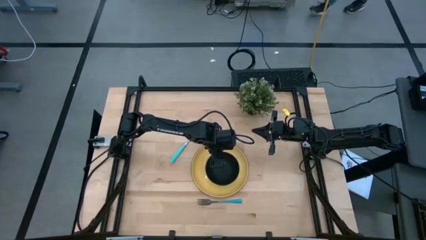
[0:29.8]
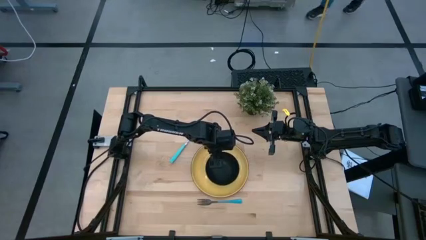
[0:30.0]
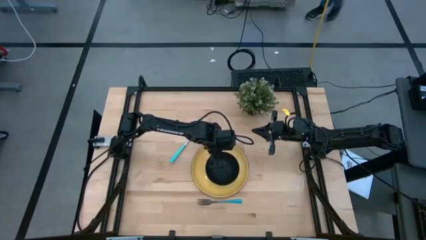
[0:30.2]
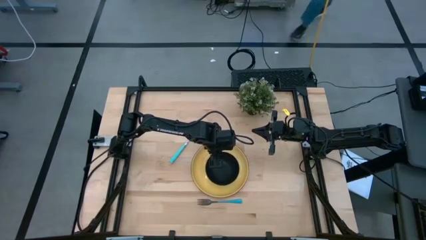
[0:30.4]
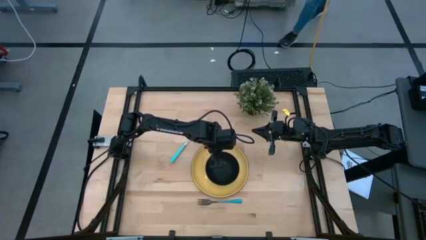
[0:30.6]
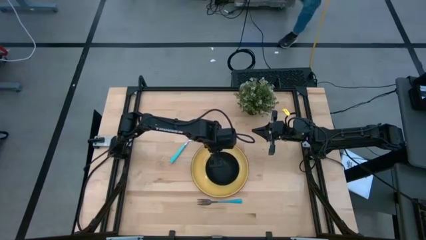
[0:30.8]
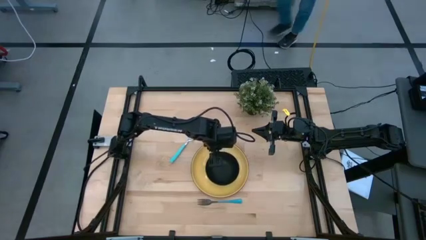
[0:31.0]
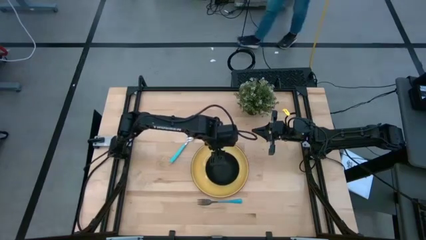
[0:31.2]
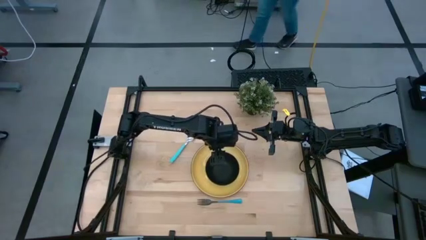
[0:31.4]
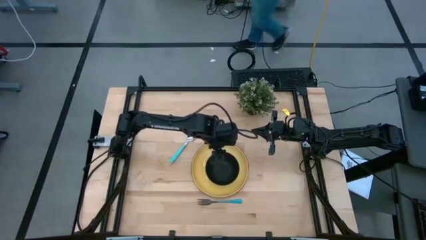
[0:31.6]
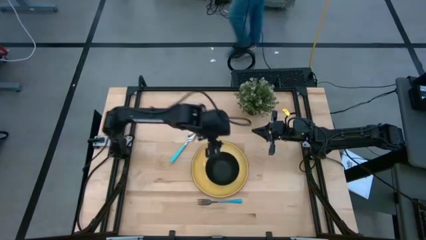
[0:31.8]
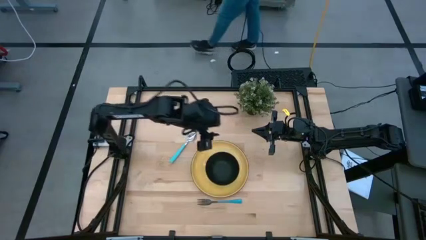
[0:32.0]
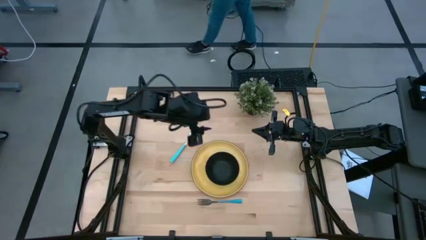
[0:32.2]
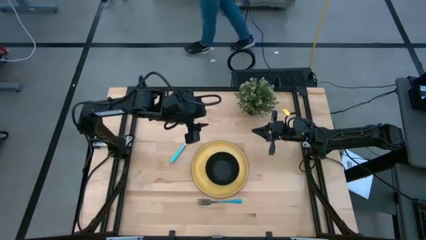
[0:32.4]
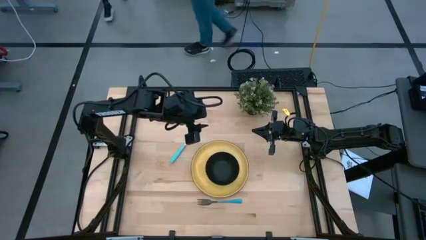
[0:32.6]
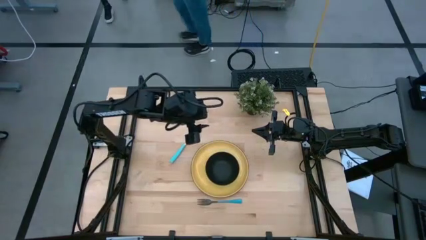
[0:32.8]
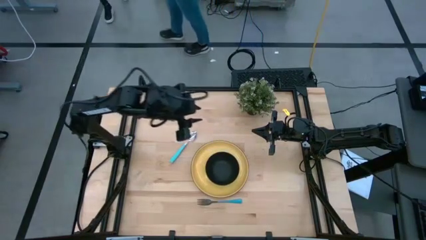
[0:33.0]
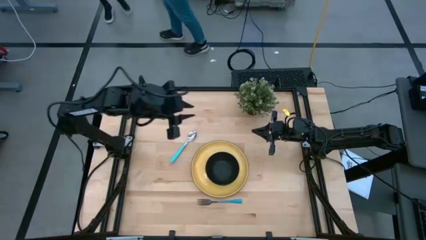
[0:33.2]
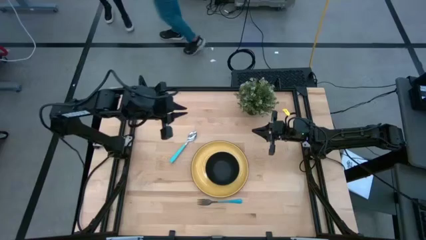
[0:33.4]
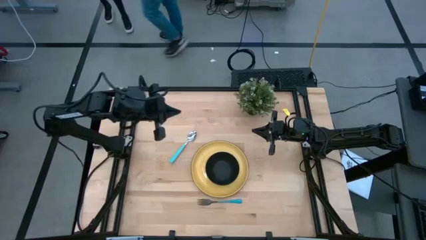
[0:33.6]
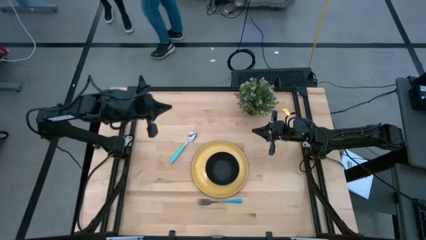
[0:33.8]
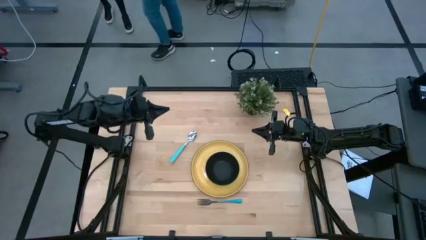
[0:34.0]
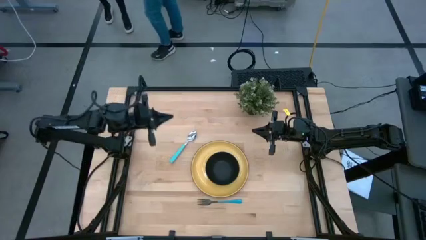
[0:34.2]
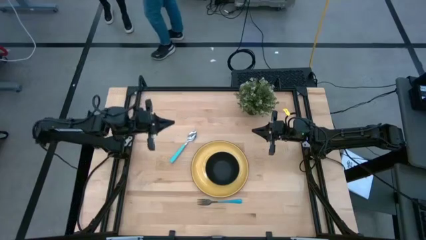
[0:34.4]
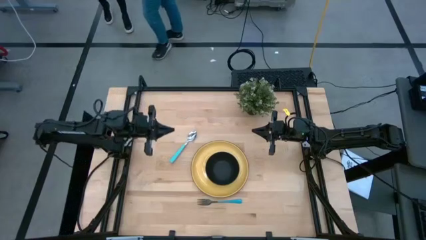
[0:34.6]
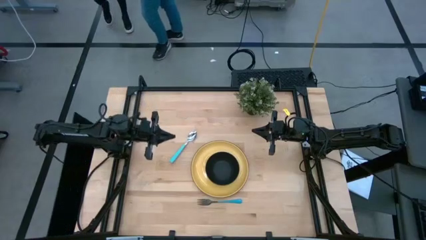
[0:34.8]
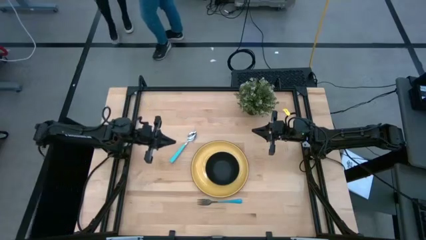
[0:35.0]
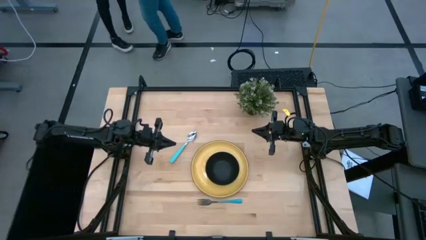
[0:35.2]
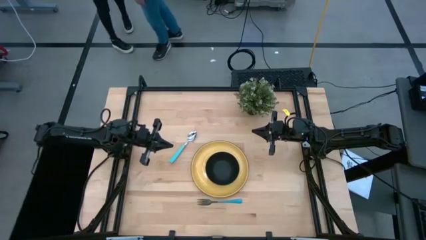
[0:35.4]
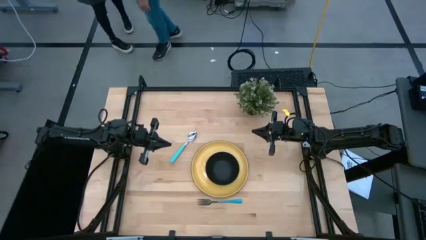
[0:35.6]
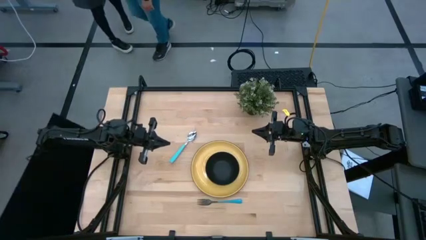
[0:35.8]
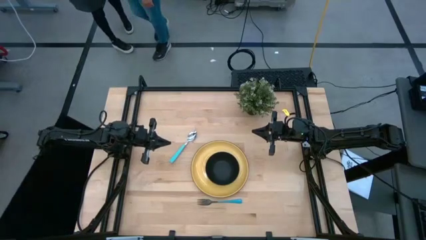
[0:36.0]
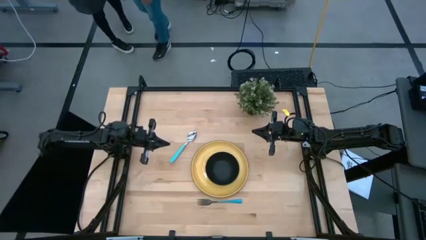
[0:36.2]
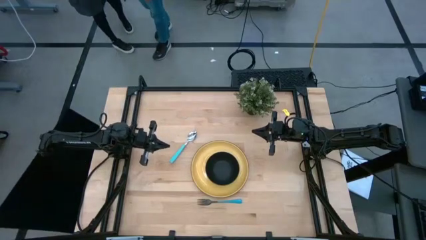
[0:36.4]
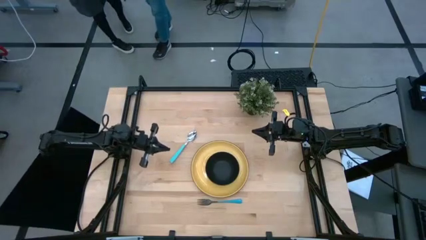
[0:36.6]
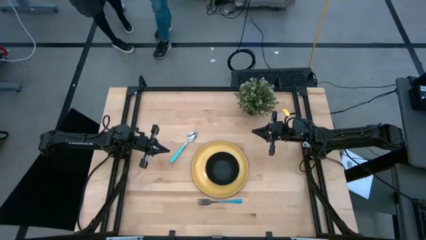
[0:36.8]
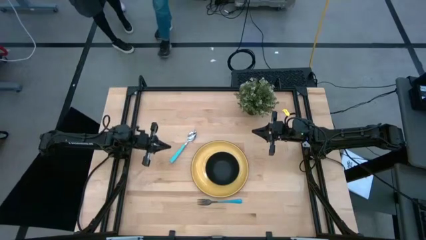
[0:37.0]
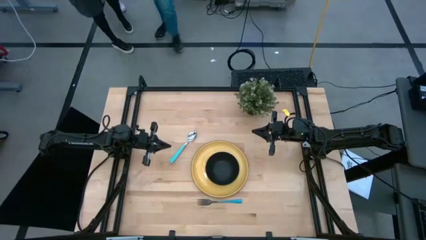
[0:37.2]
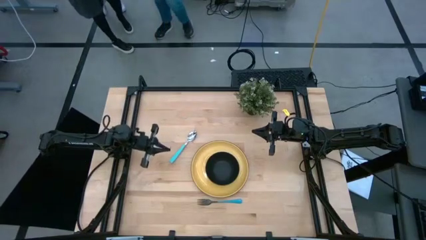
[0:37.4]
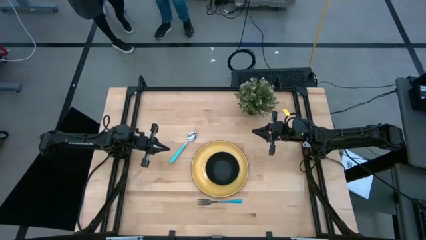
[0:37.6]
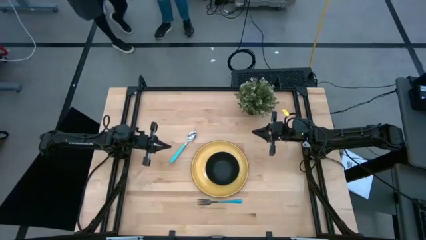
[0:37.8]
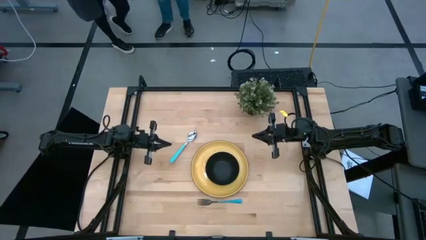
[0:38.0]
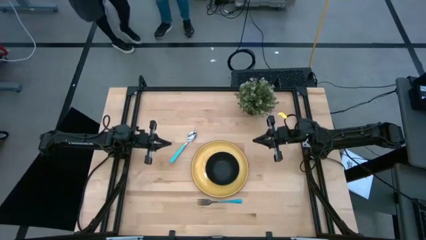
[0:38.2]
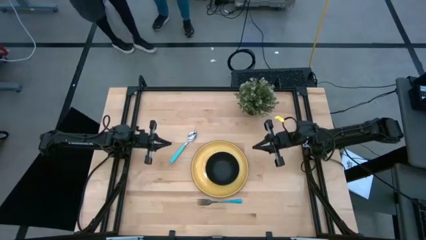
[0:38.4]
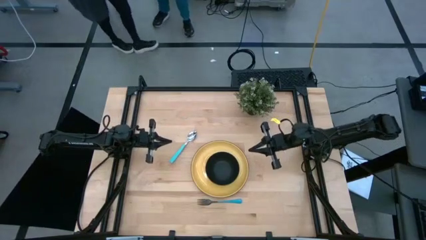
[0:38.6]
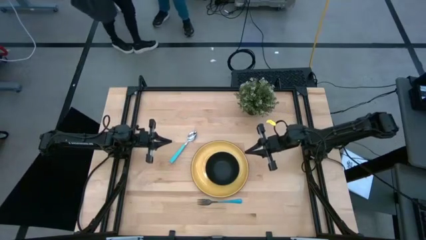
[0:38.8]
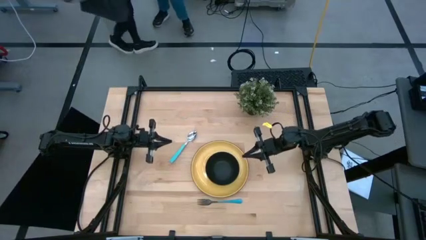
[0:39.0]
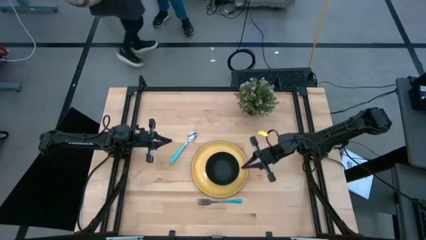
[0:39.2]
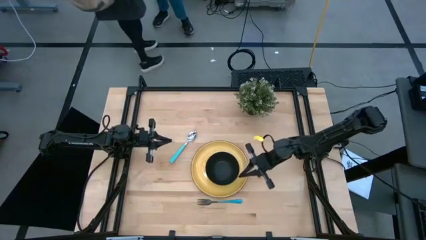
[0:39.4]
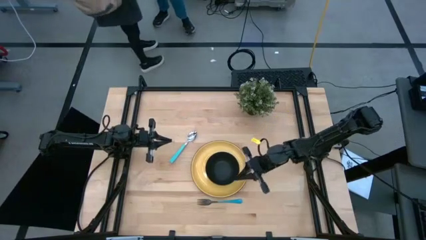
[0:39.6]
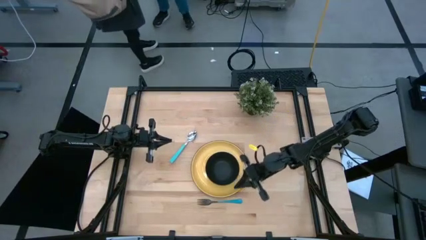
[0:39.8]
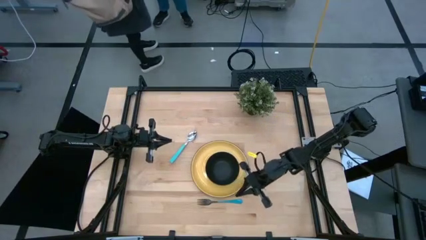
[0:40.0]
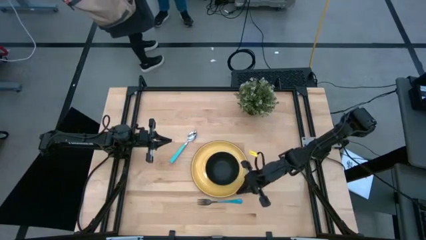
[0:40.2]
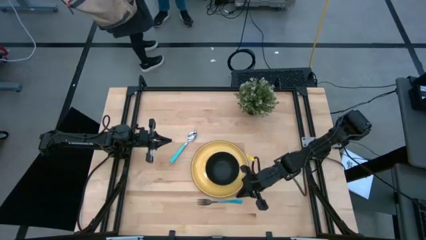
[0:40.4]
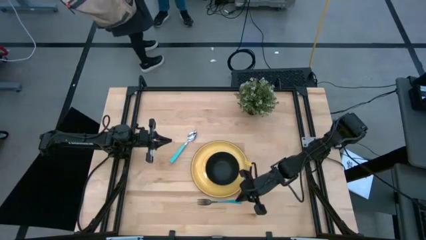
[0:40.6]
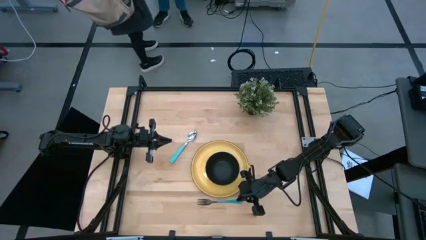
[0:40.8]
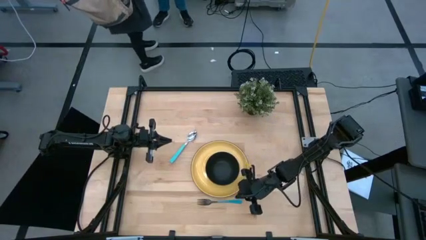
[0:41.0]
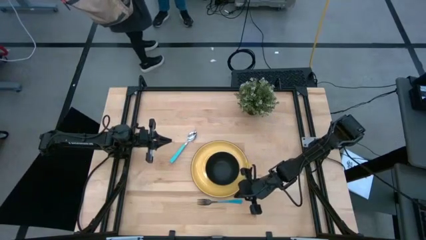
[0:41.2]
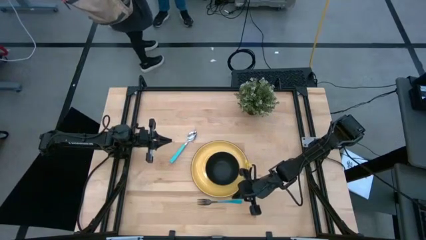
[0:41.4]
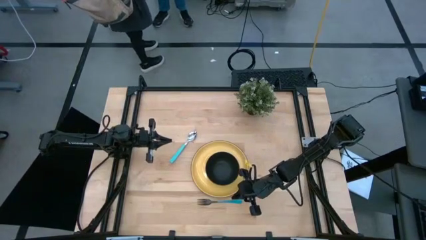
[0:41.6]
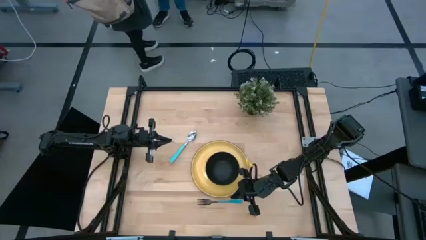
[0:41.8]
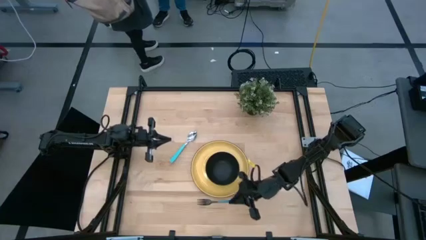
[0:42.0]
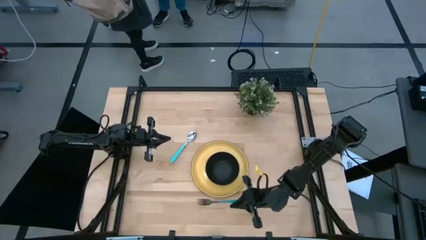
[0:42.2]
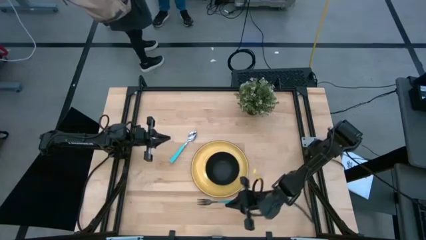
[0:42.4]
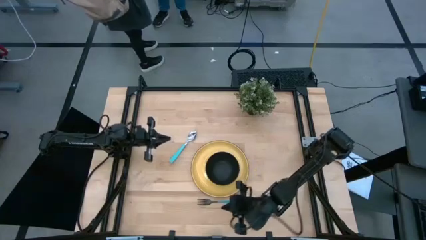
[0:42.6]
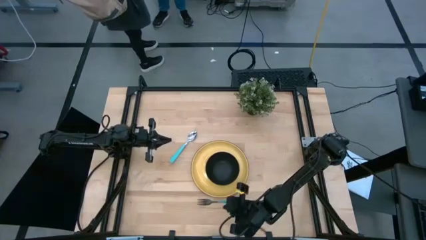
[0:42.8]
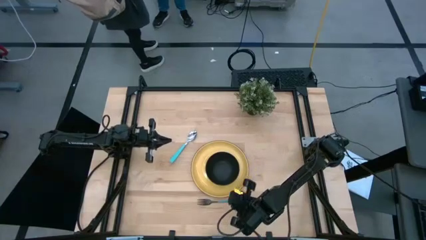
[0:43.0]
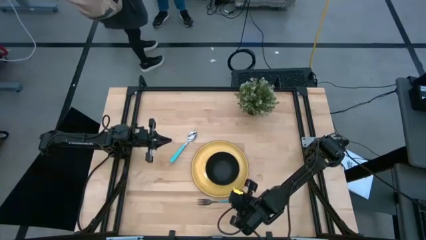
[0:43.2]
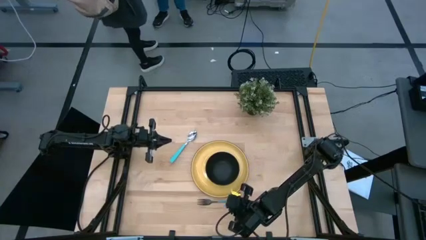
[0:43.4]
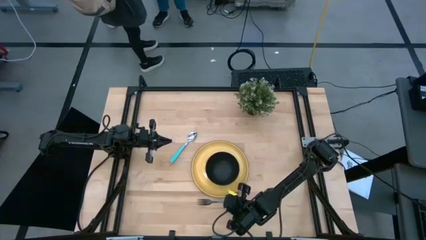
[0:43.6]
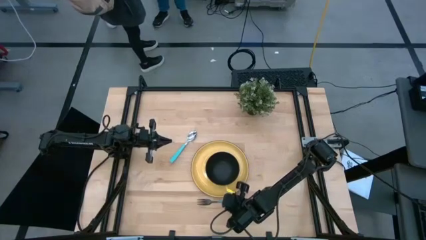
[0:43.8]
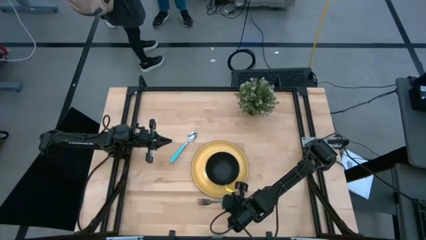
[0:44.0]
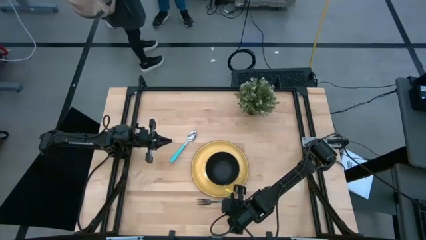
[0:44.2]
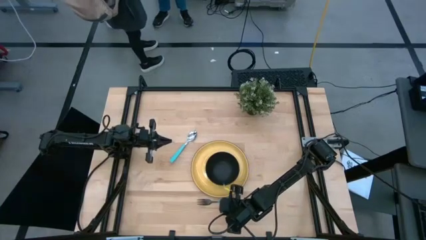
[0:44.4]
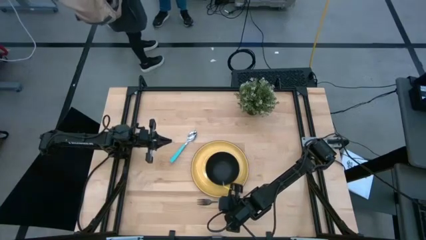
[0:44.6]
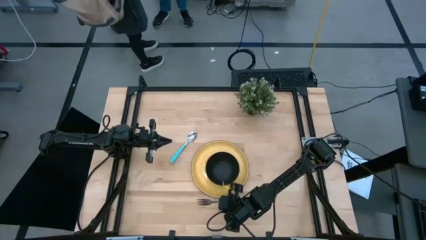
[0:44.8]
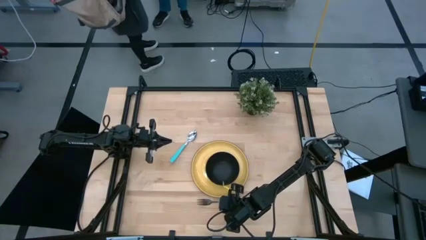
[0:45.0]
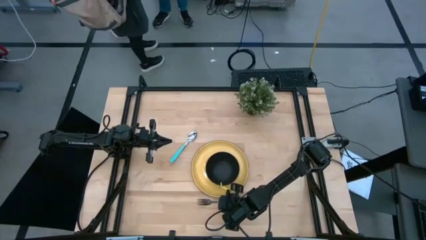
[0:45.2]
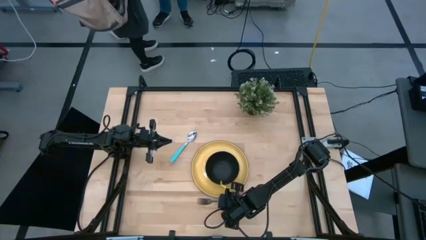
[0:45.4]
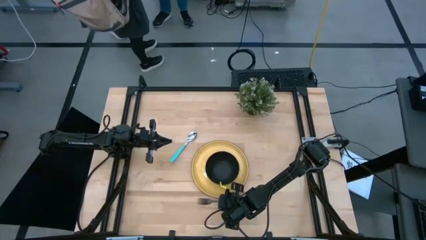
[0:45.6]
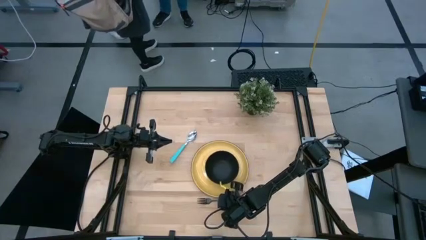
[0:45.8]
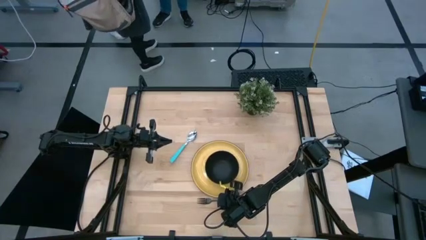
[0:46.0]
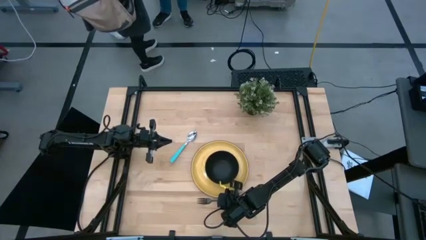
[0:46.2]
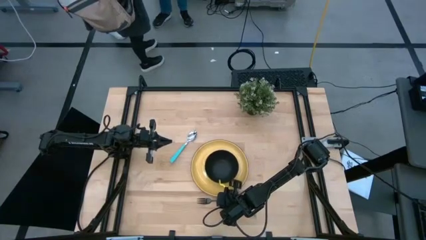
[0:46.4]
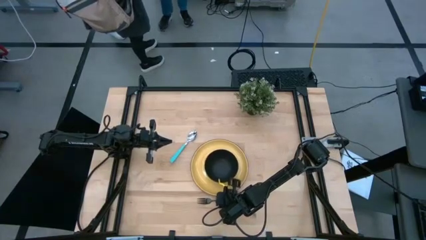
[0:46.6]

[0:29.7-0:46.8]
Task: Set table place
Put the blue fork to the right of the black bowl on the yellow plate
